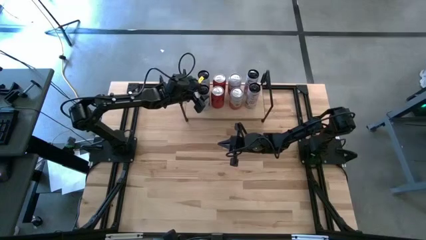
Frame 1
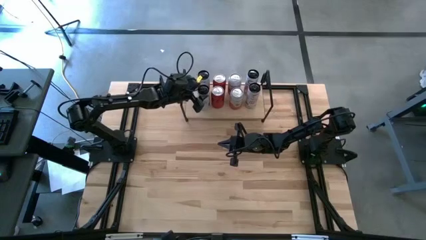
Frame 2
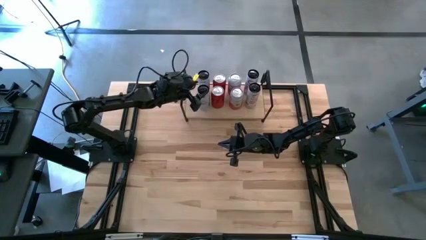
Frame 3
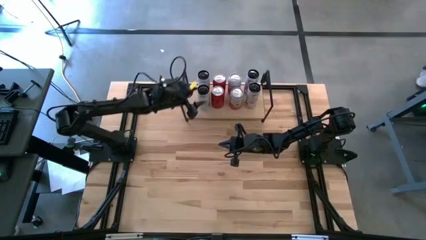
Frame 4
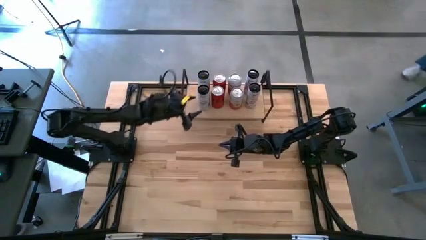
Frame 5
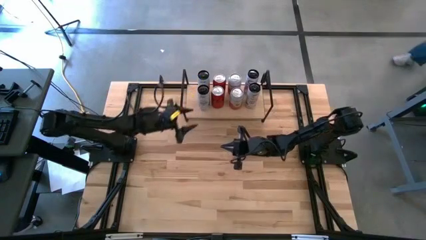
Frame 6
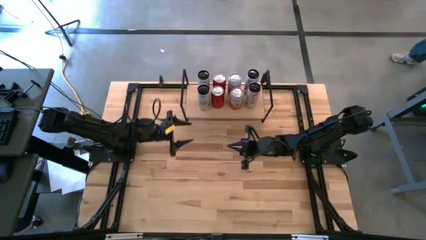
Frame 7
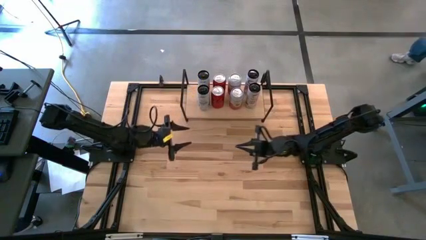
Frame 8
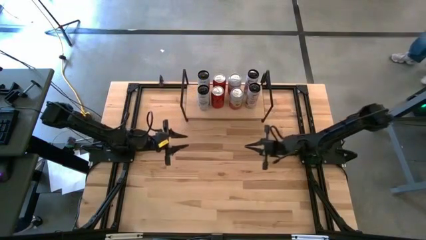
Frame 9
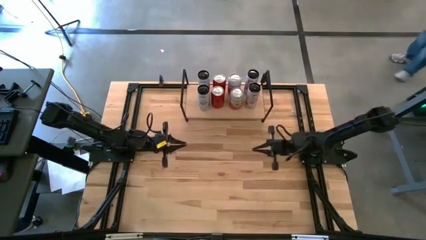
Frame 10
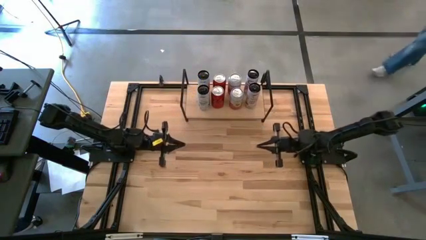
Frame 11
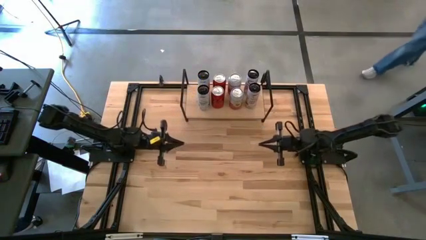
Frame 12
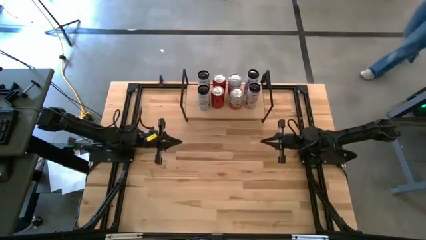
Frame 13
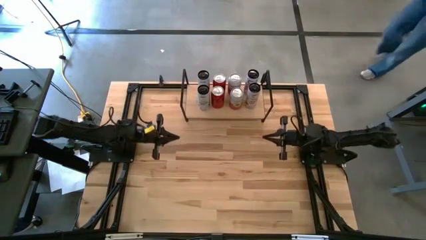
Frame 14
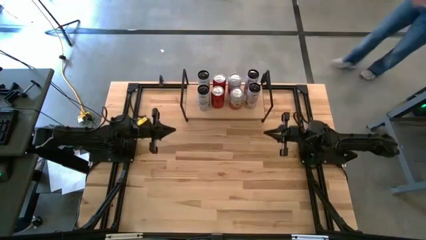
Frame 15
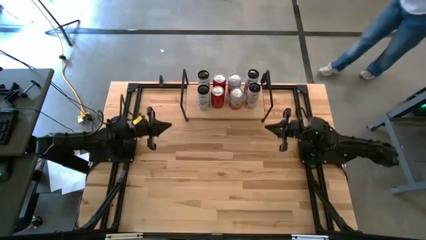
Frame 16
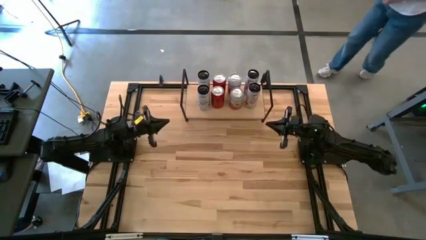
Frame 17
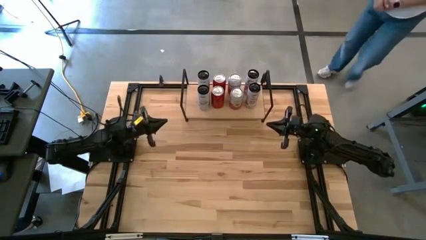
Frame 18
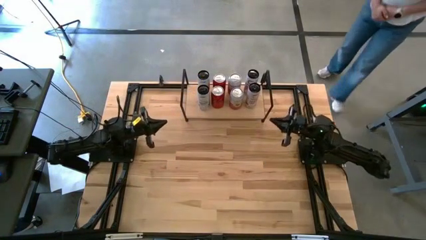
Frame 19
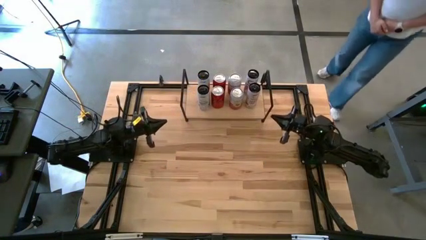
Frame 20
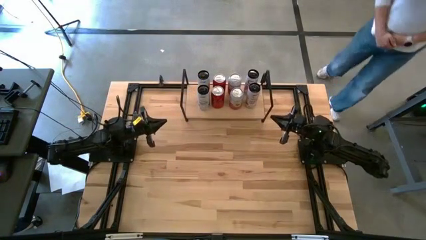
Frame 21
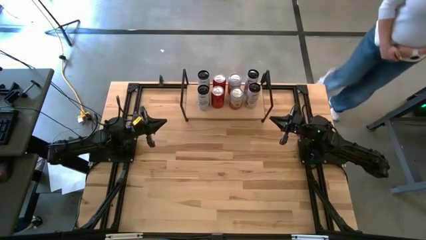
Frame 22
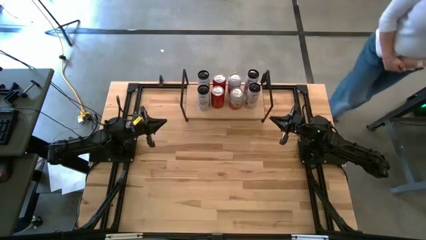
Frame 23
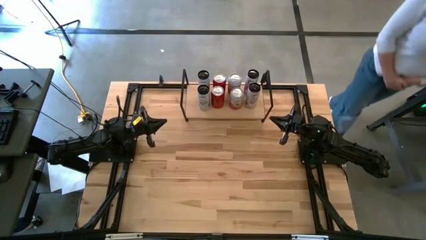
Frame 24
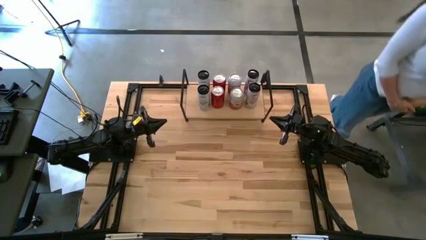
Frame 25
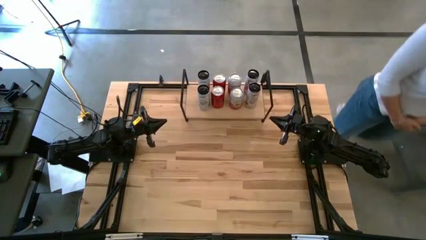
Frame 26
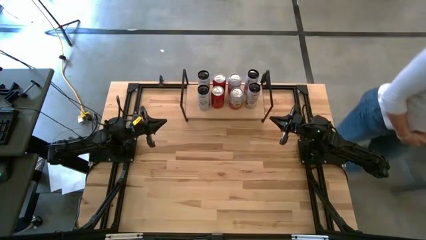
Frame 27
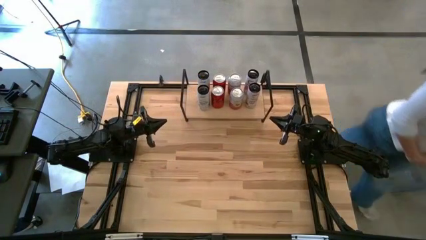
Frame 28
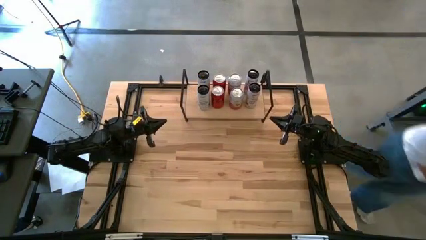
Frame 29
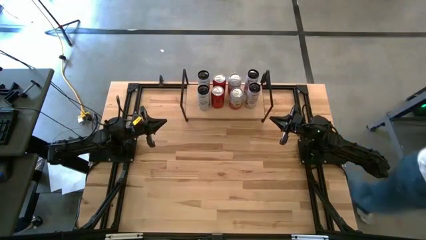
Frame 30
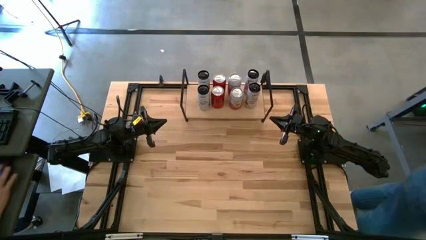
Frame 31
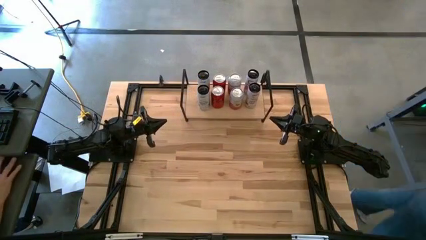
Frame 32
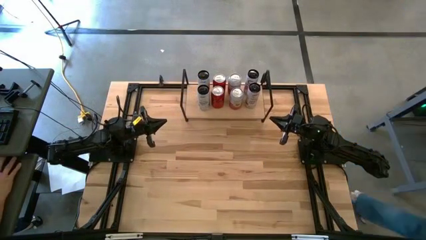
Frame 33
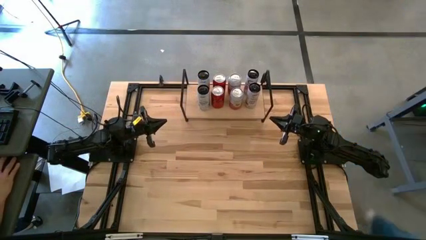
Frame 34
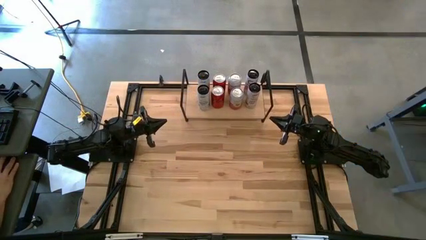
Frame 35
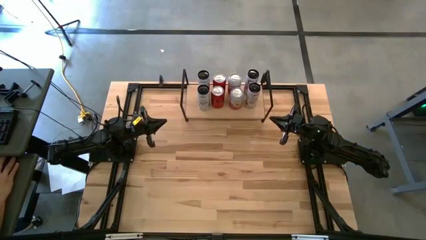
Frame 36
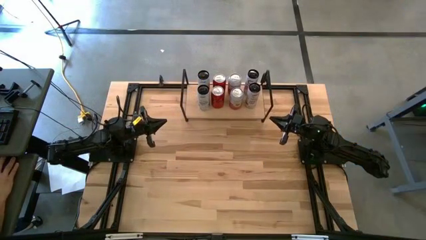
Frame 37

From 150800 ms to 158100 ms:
Task: Place canned beverage on shelf
Return to Home Position

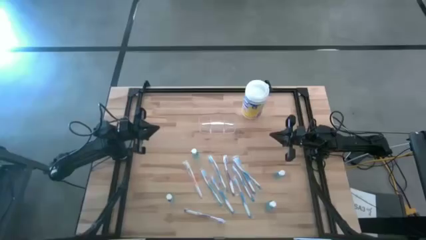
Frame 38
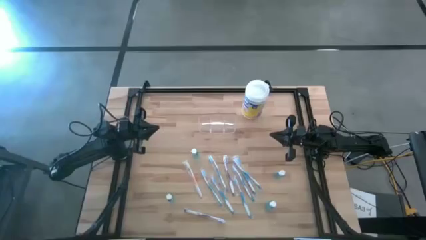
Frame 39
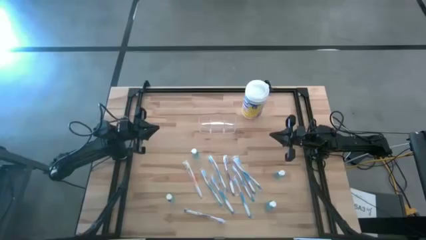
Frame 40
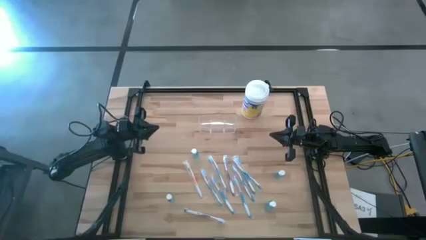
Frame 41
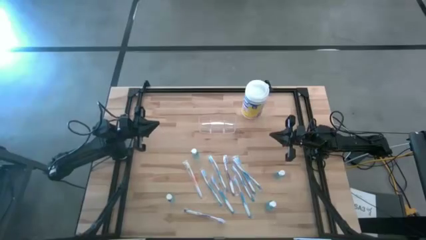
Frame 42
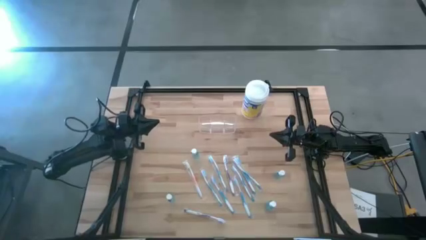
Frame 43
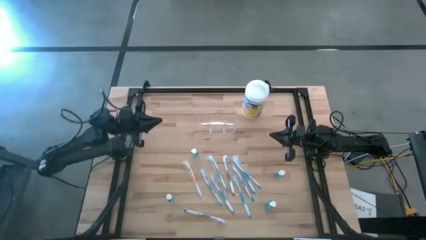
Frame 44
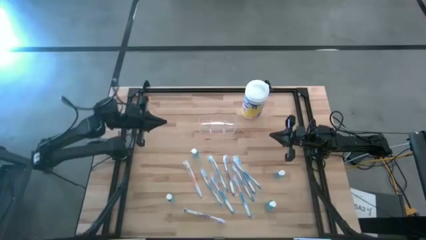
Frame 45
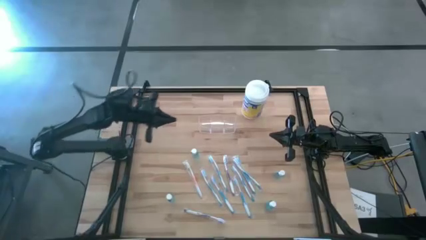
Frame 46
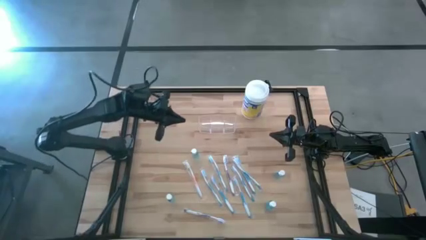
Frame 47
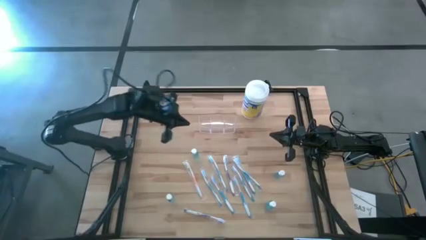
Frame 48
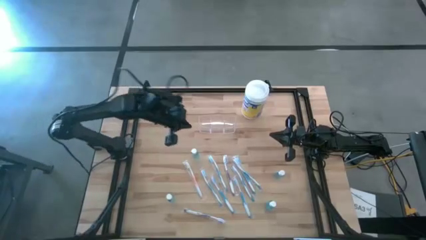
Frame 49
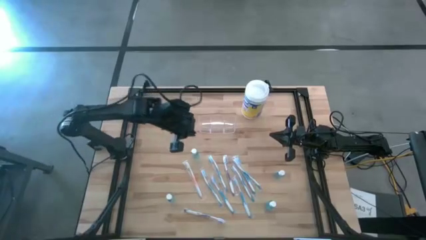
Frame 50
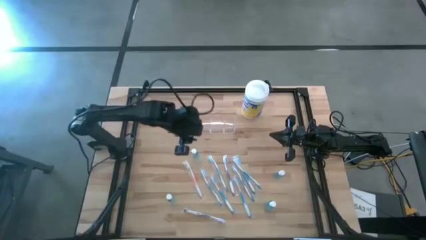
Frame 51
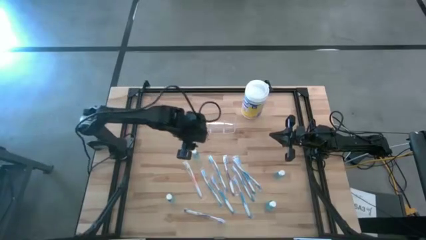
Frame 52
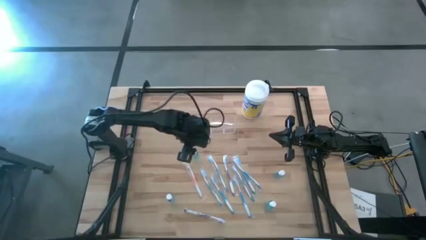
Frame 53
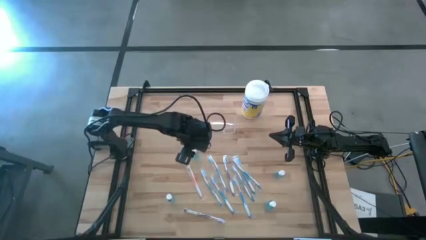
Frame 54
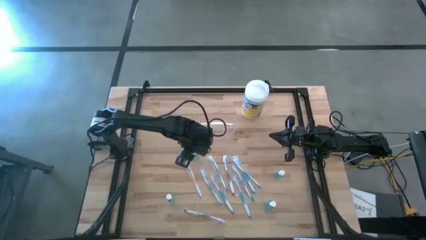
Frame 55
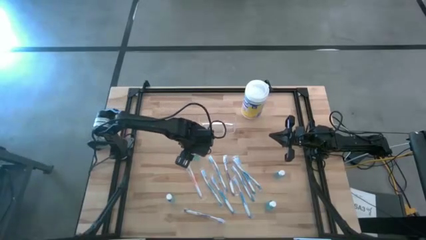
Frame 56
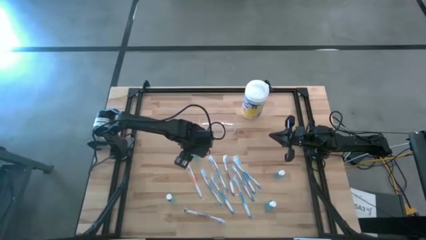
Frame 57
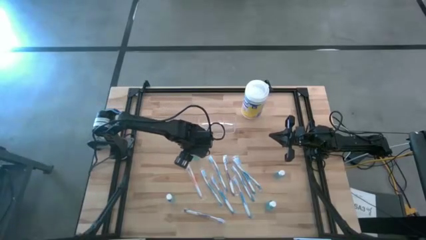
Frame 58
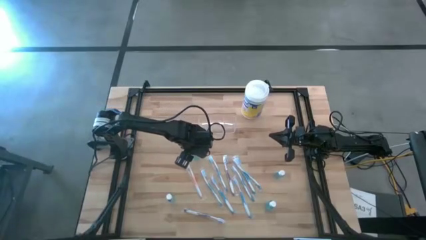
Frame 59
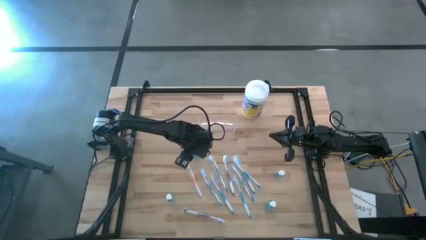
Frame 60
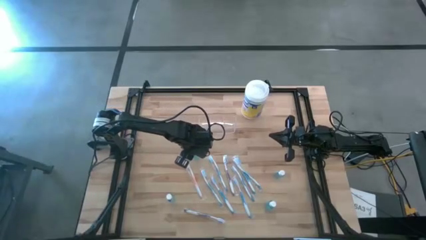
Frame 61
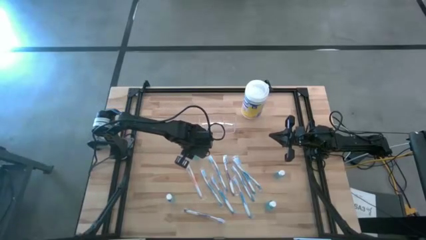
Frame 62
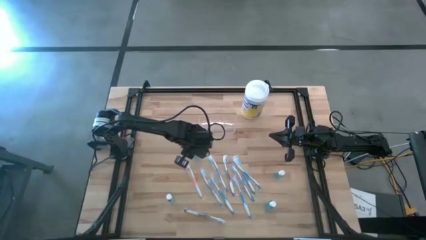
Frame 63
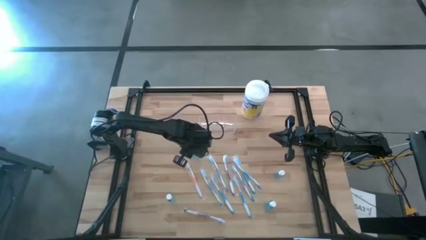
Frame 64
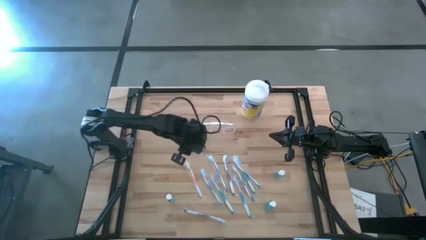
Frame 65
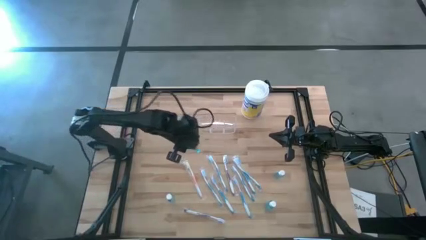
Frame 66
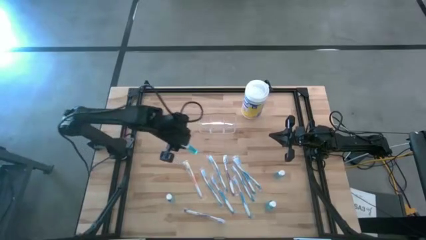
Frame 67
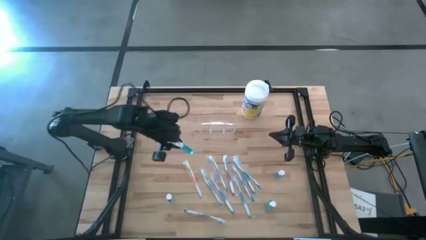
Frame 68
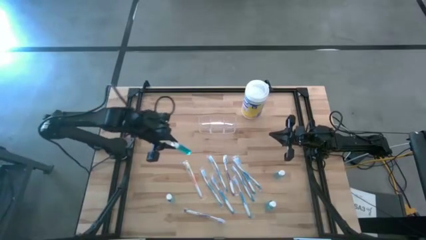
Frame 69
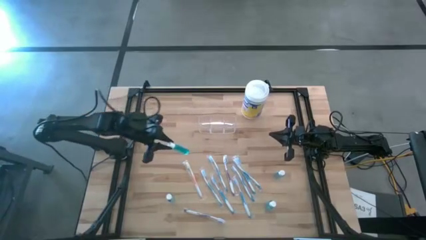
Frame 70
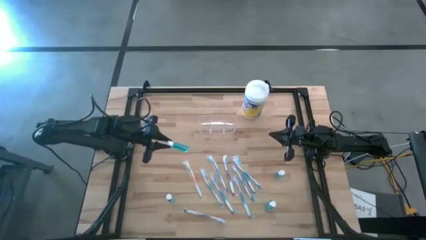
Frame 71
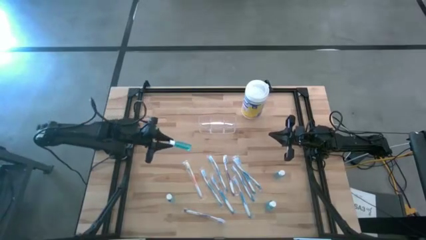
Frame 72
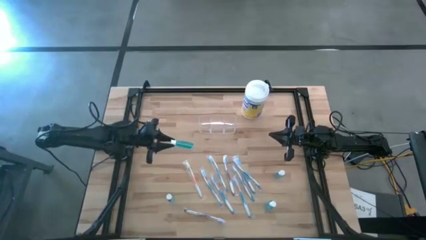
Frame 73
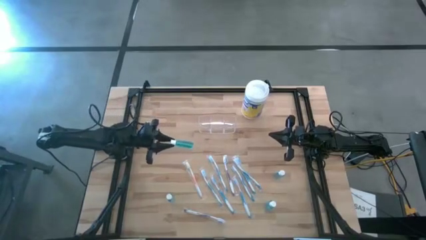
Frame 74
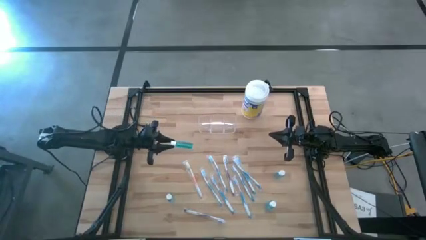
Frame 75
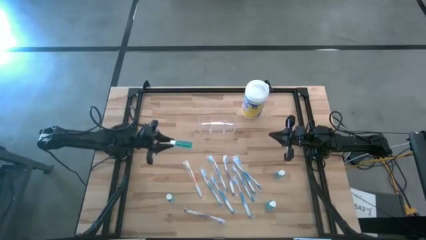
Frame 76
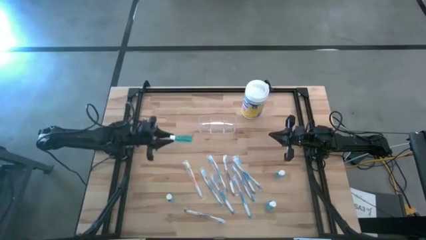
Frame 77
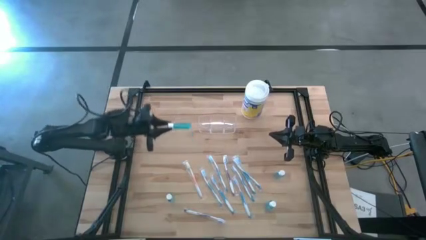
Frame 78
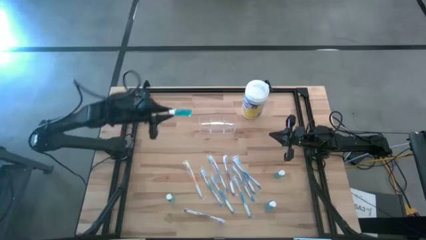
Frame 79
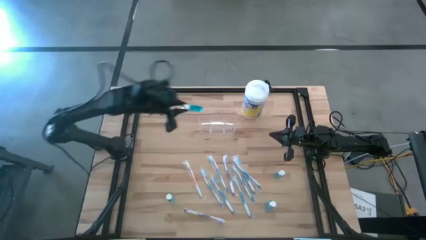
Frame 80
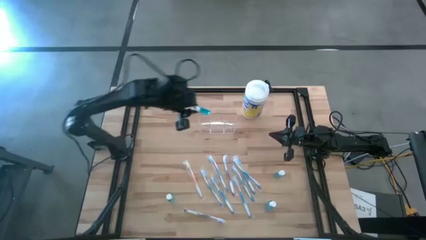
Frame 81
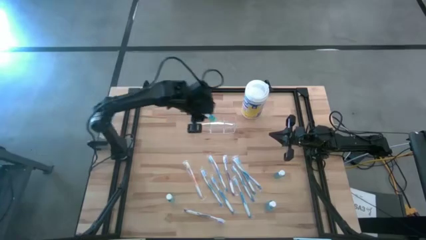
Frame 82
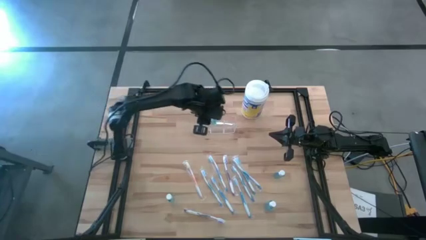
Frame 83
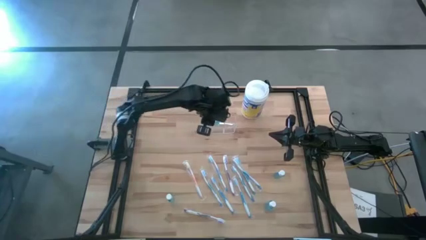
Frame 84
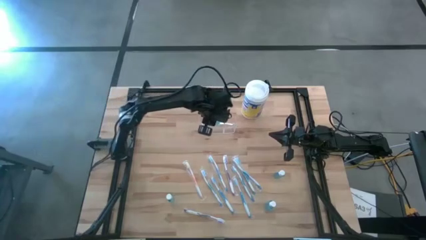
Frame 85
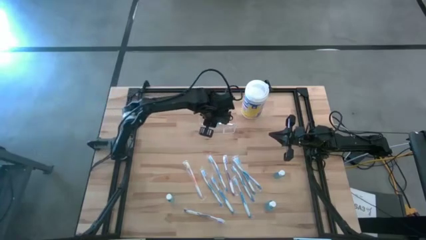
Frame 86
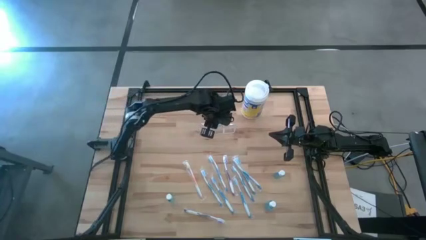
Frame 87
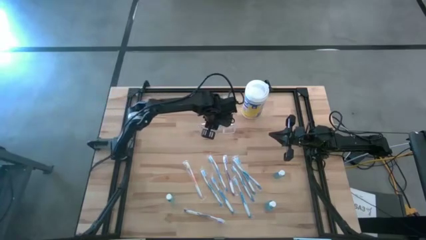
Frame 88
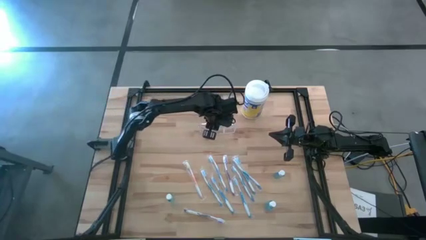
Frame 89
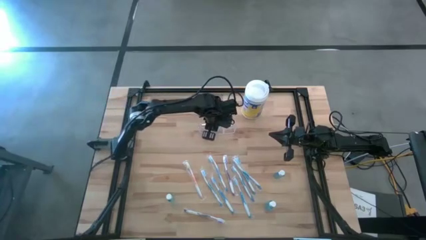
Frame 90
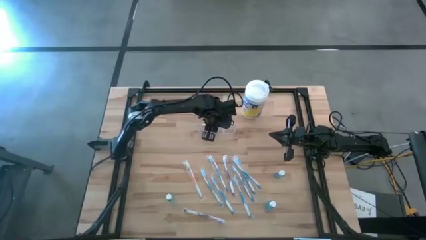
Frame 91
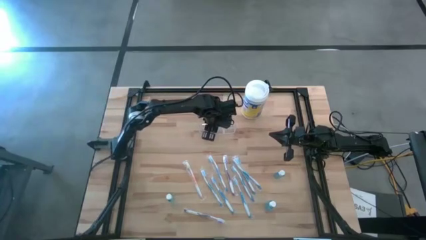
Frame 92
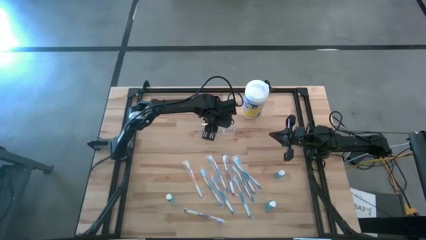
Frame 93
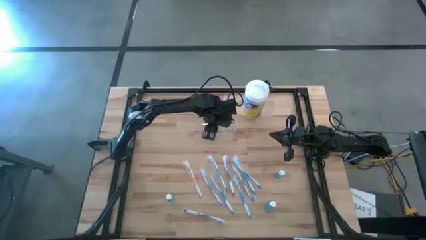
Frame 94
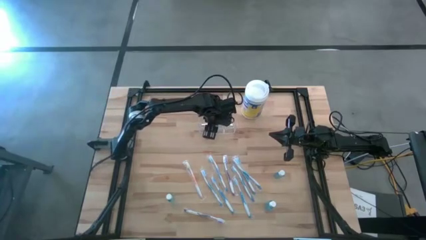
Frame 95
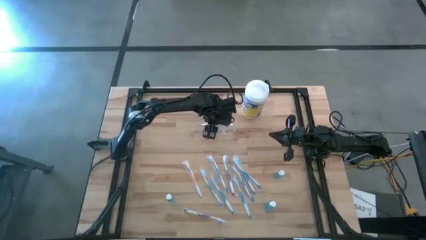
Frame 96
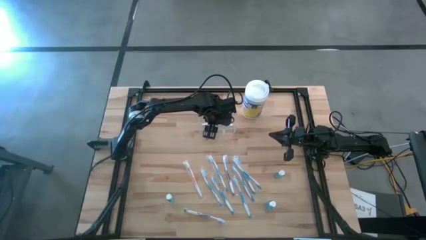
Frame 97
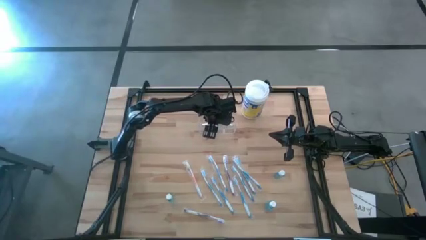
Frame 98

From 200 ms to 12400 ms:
Task: Pick & Place toothbrushing station
Put the blue mouthwash into the transparent toothbrush holder
